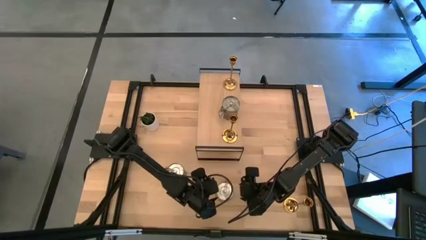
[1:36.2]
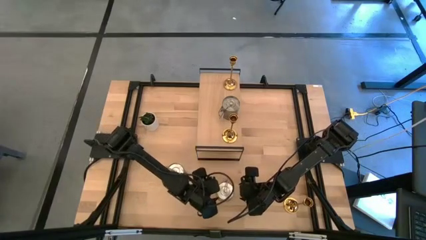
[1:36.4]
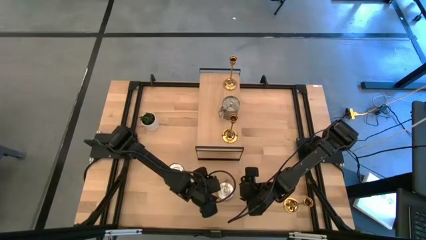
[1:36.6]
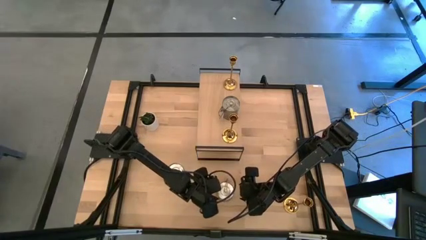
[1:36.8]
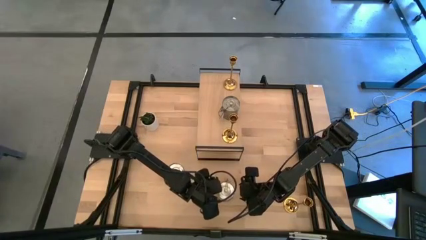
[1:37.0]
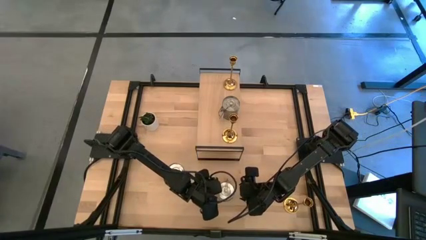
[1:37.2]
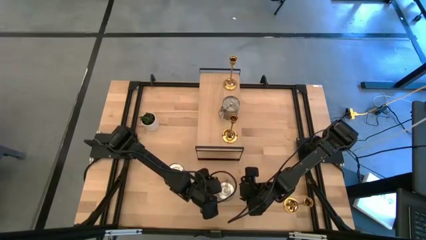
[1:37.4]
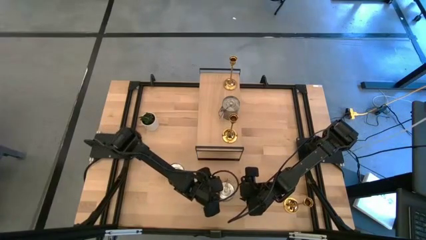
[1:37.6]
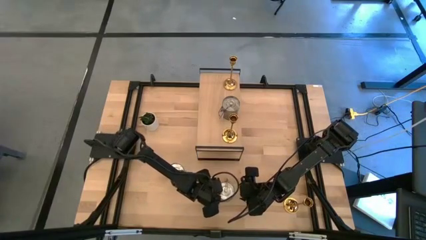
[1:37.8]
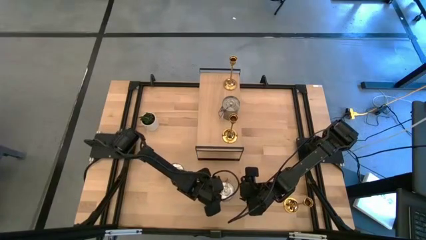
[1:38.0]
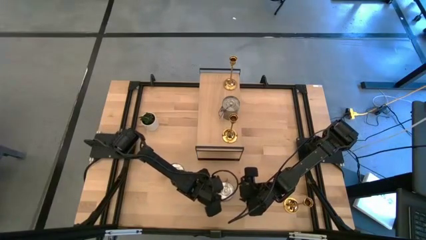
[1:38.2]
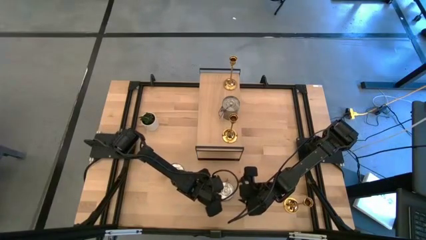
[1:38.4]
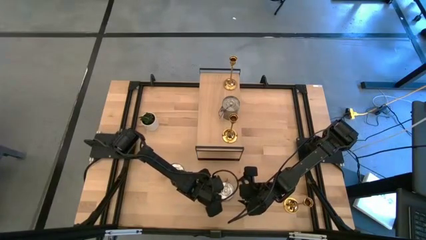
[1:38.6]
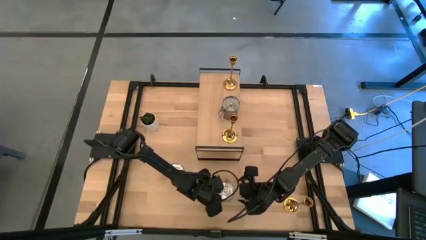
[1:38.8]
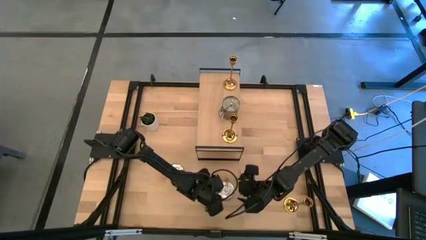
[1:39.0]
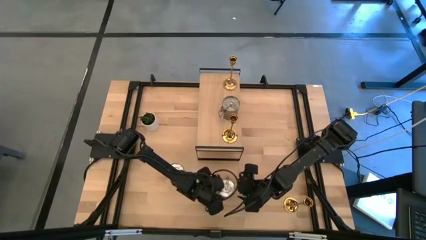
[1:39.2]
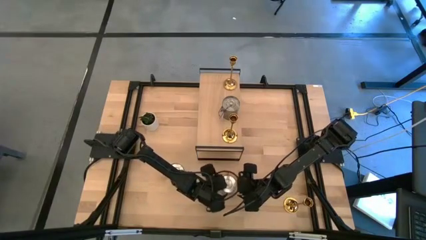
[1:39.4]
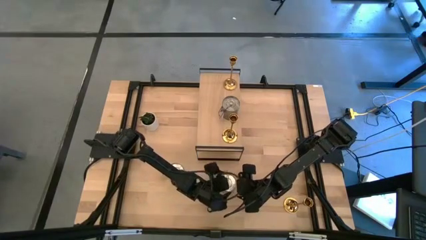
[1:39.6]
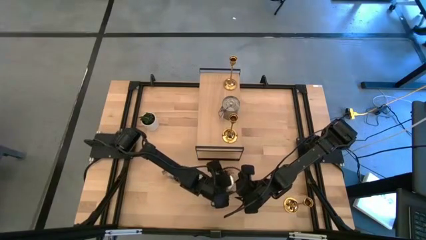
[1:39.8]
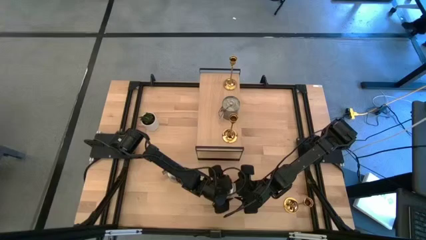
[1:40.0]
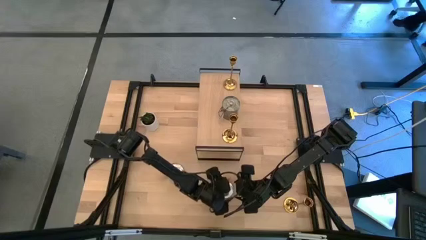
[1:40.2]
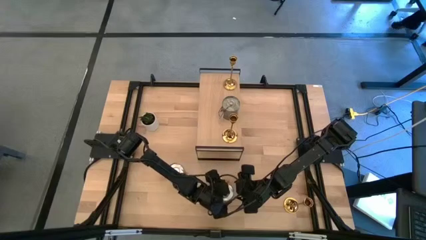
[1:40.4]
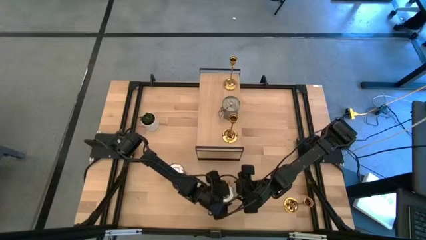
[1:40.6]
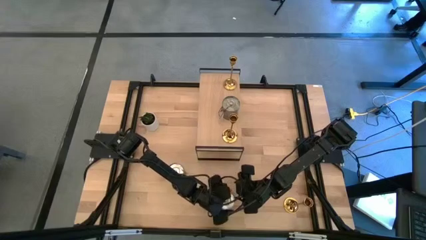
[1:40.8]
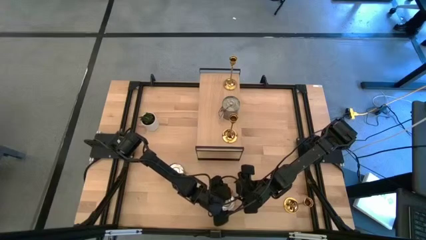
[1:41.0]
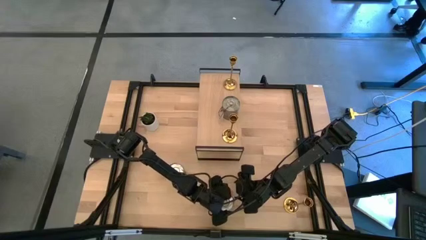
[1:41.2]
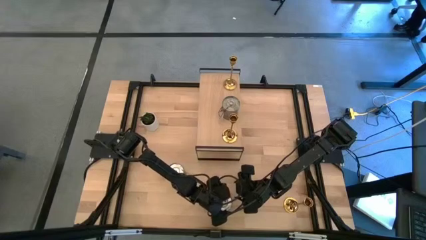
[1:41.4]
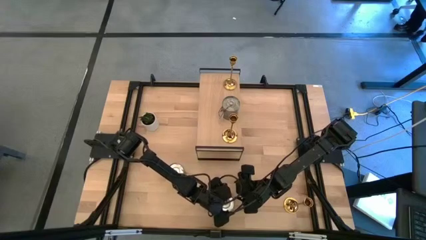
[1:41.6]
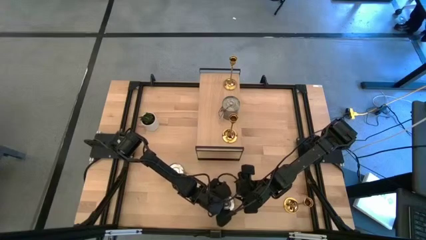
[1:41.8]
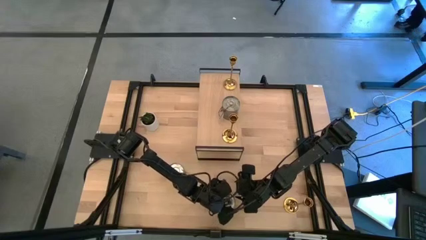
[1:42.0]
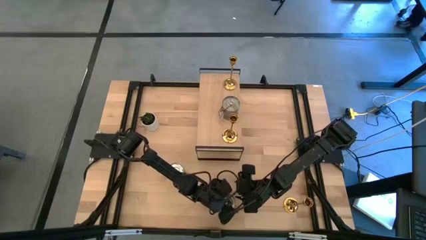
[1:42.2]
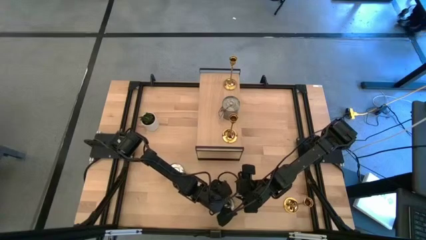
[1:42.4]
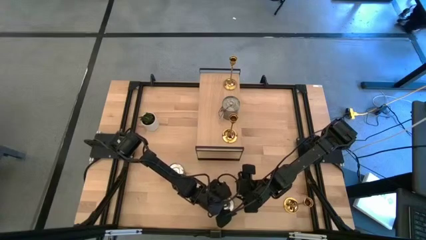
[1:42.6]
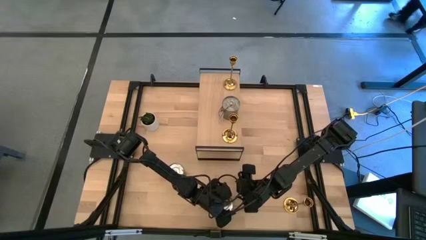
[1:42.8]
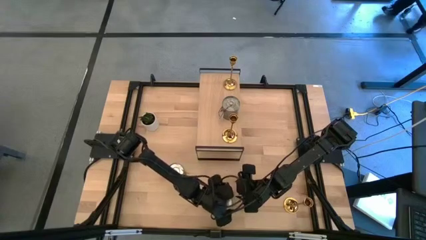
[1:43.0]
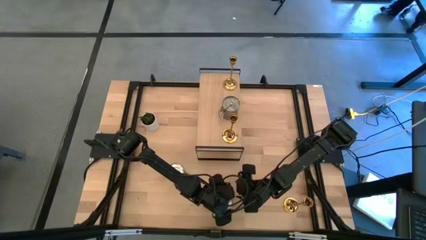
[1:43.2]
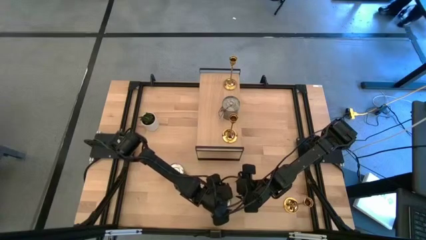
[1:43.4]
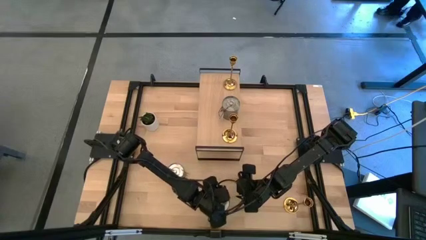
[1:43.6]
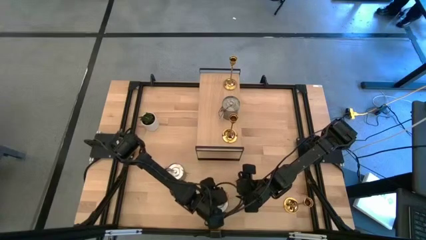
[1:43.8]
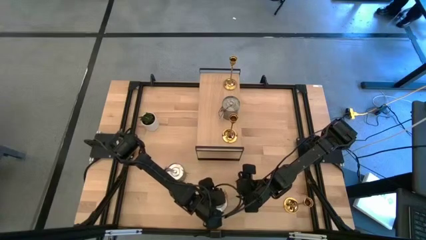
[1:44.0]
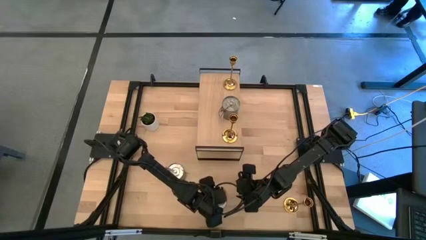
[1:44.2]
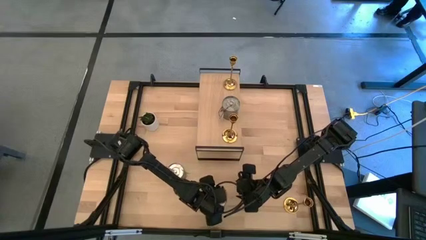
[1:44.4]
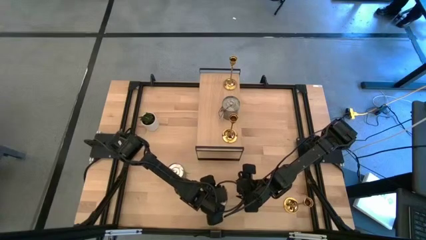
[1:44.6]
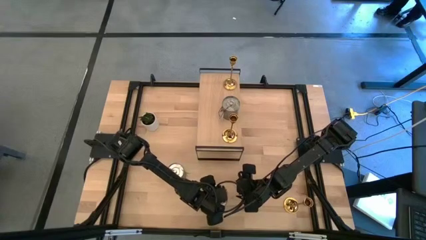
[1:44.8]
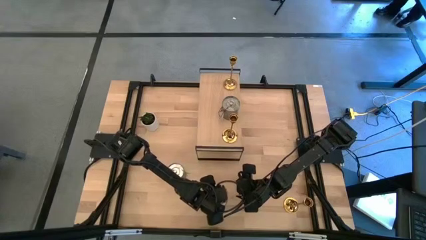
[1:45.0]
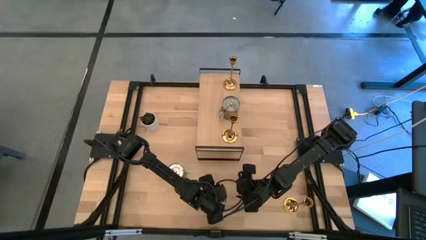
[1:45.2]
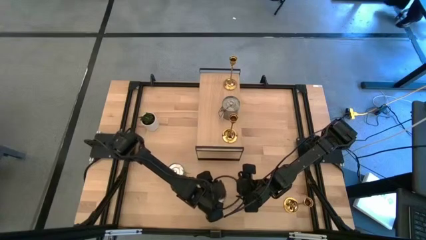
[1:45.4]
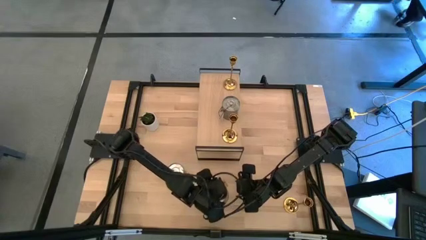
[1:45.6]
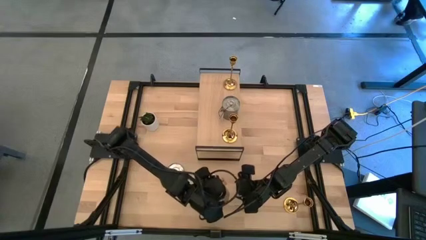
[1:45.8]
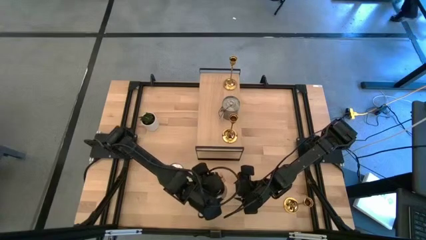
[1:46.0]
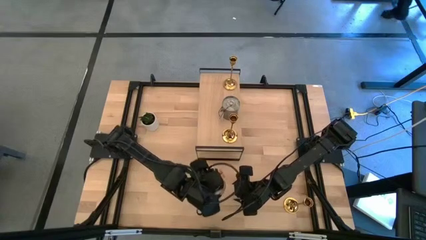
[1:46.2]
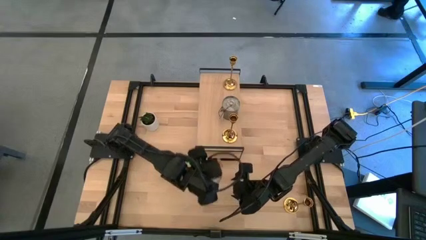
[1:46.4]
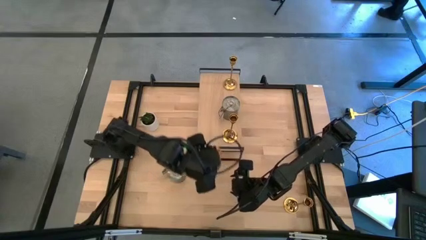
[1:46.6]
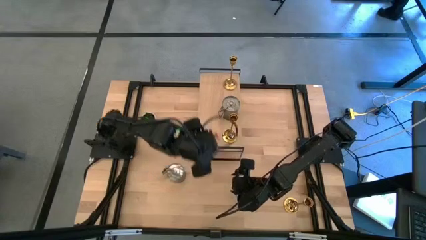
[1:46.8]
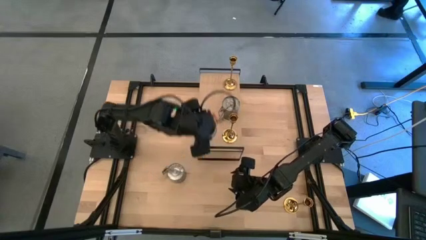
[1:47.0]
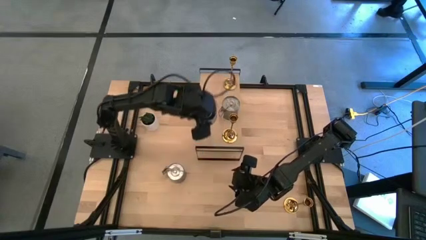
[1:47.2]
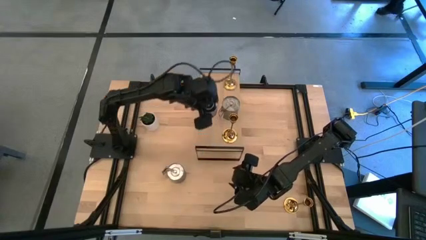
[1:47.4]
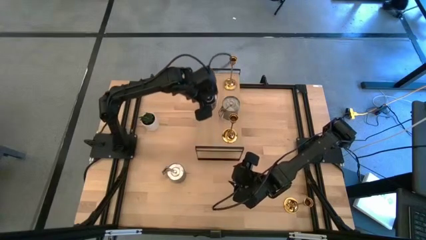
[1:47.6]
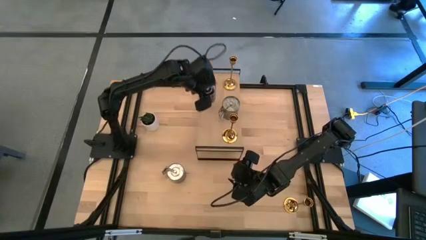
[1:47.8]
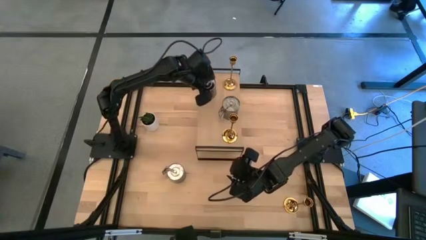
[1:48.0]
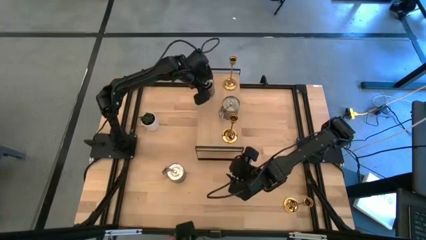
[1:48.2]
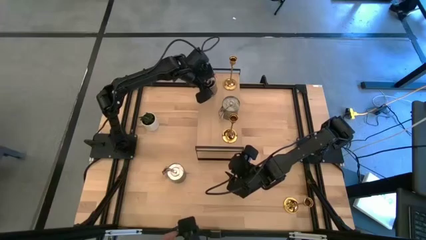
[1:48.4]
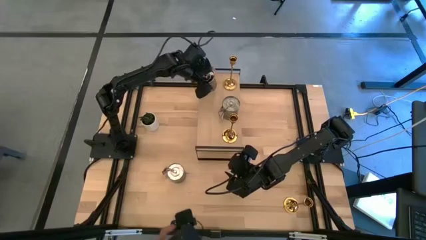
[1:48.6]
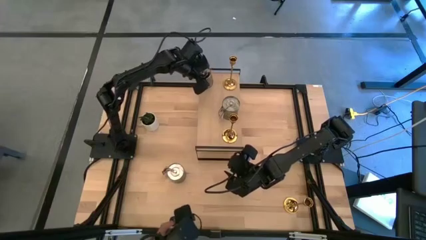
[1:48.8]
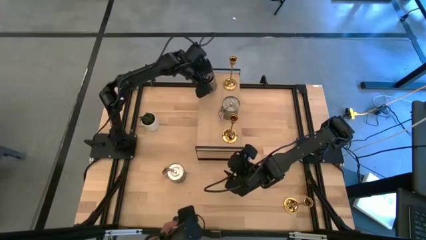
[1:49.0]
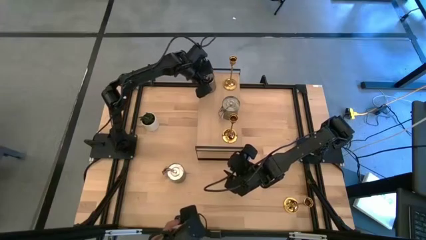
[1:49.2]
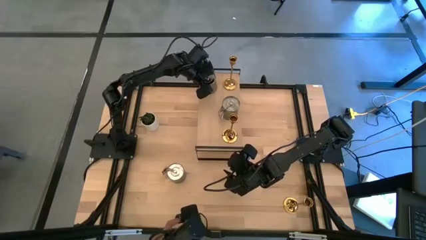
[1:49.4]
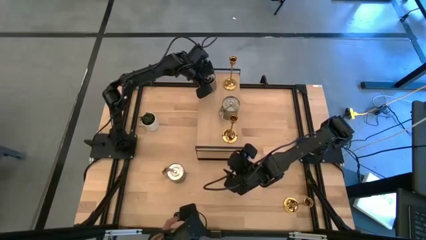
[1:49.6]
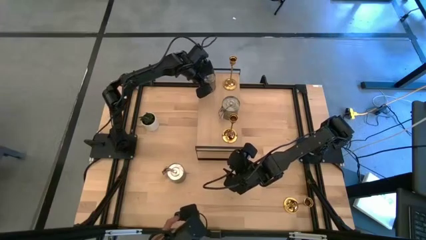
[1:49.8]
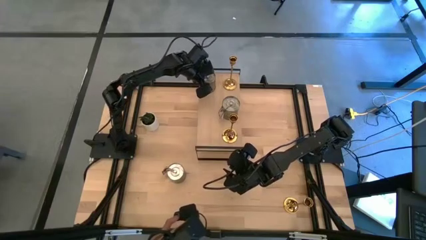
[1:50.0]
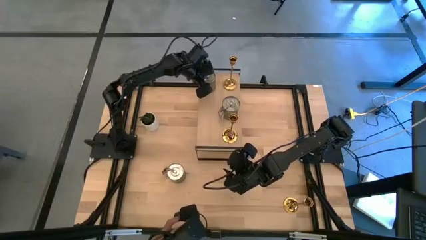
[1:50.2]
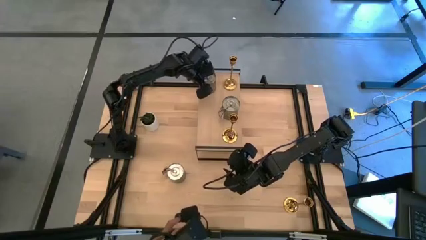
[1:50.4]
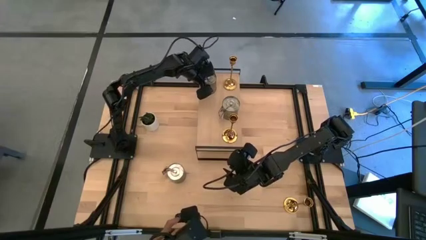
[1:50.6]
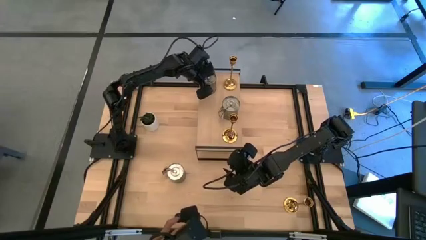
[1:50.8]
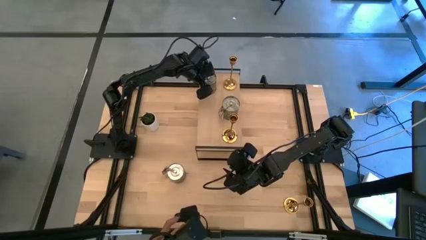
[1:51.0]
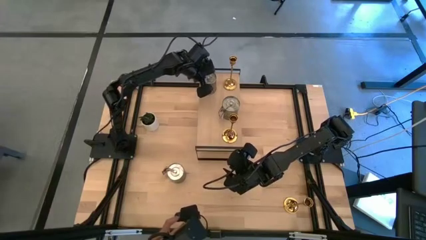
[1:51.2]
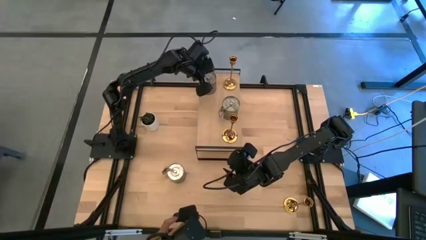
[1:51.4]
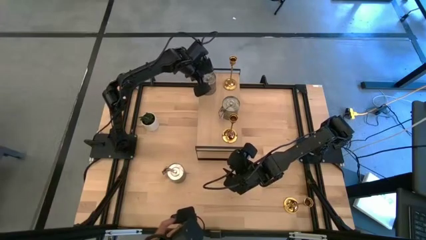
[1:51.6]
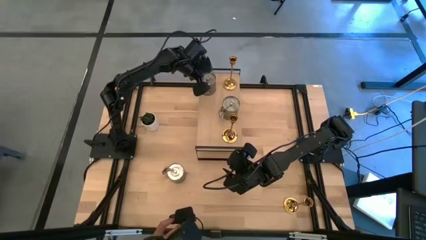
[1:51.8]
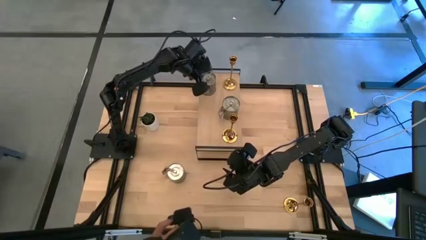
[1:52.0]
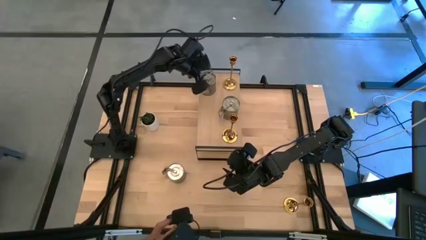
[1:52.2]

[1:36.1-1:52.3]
Task: Pick & Place candle stick holders
Put the right silver scented candle on the shelf
